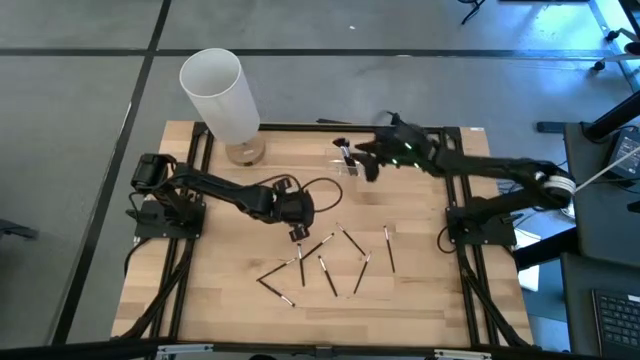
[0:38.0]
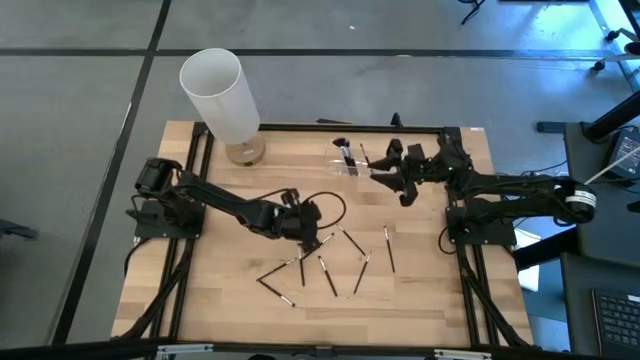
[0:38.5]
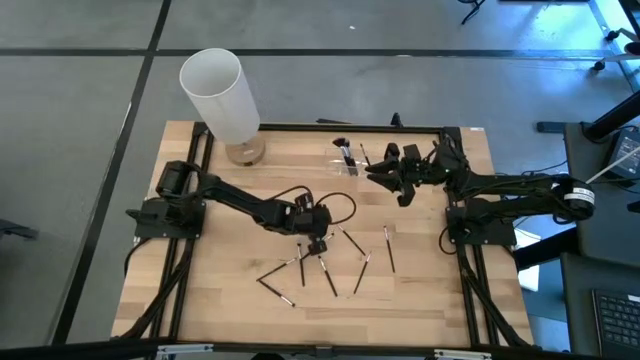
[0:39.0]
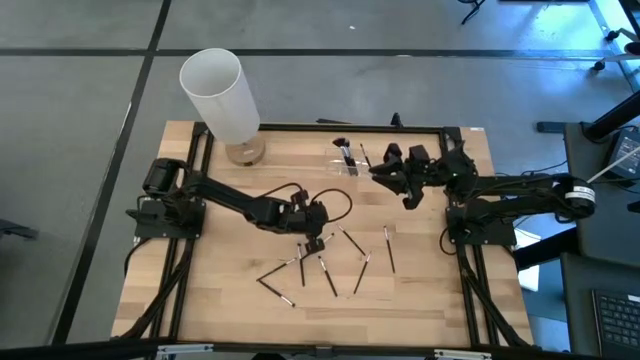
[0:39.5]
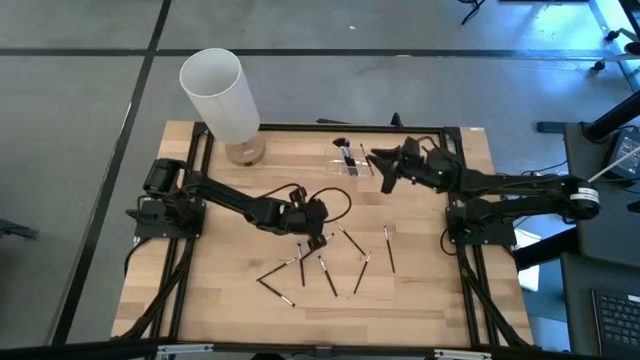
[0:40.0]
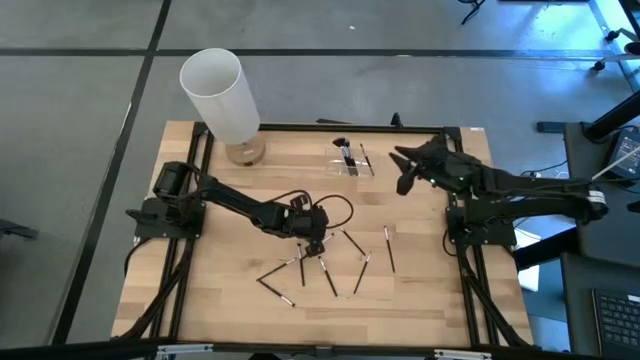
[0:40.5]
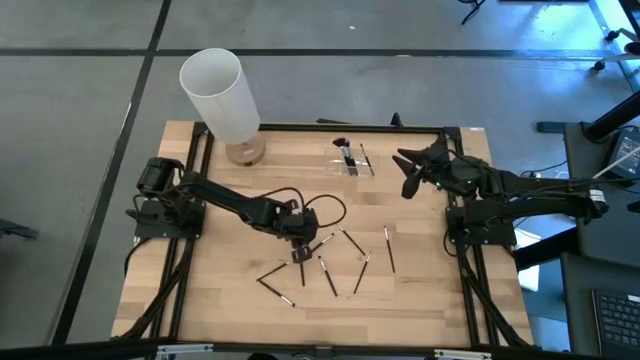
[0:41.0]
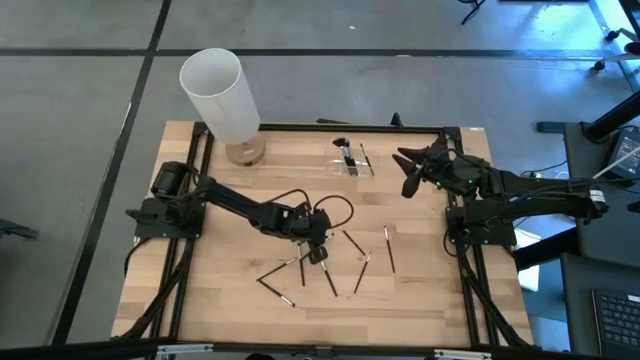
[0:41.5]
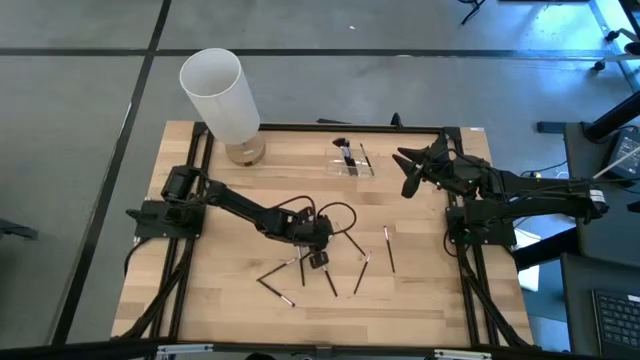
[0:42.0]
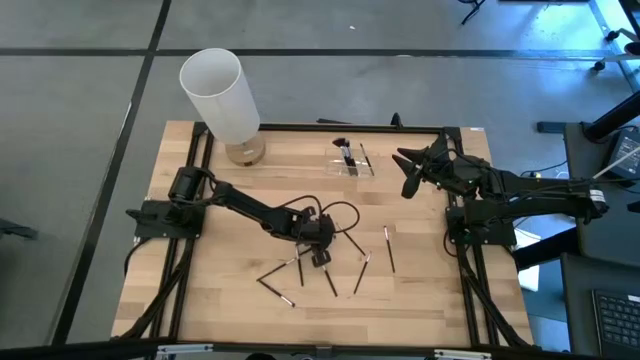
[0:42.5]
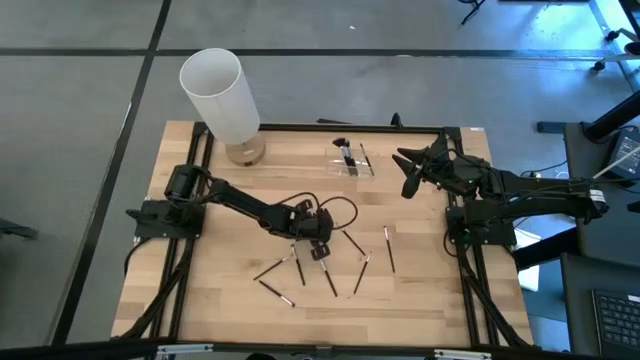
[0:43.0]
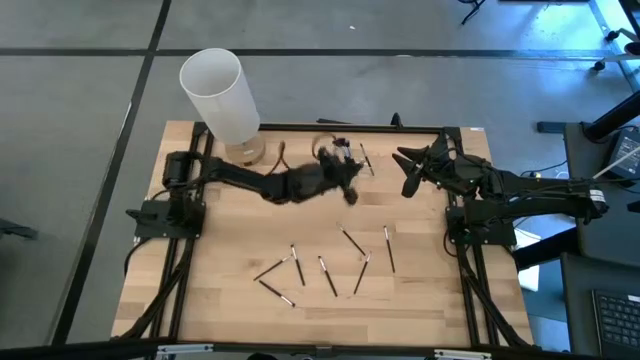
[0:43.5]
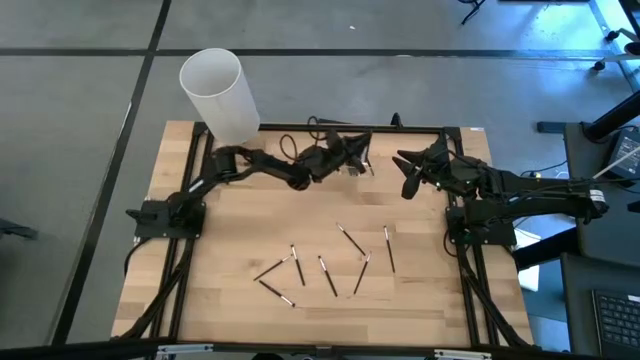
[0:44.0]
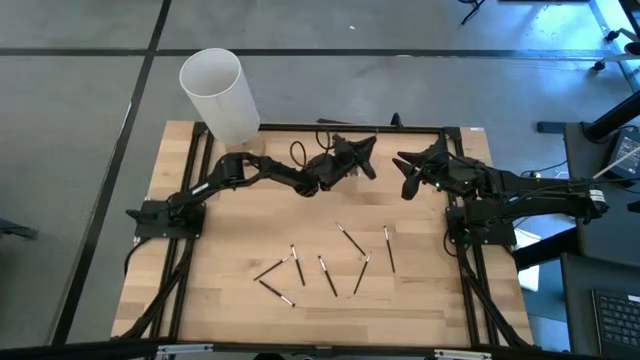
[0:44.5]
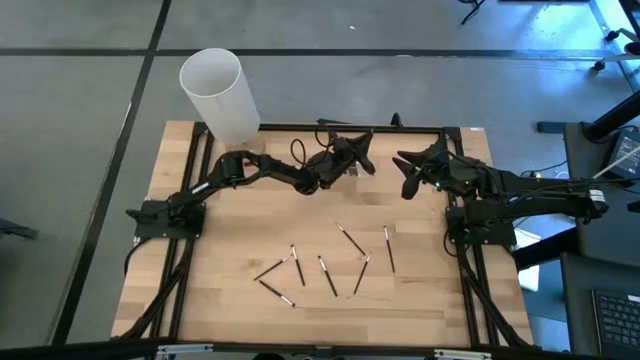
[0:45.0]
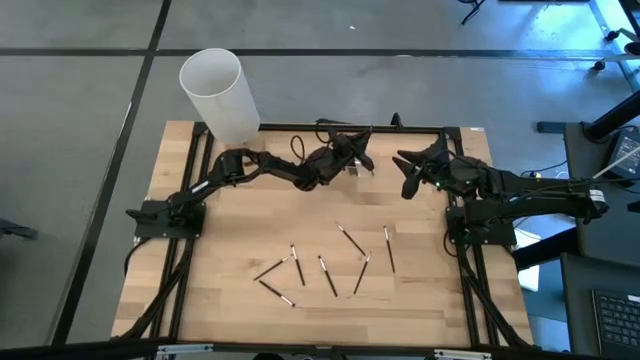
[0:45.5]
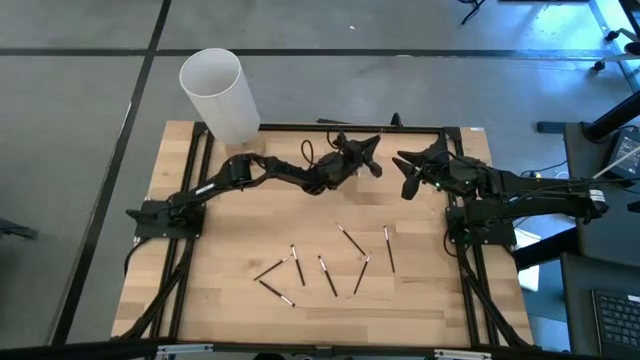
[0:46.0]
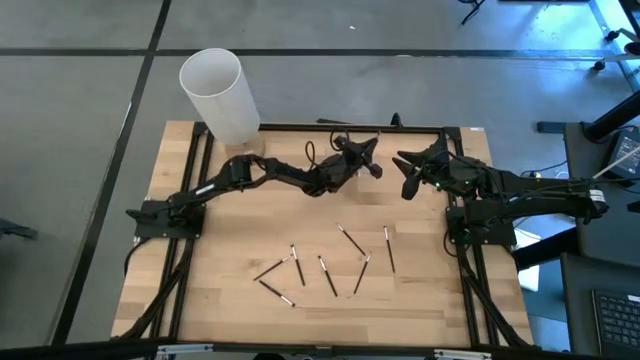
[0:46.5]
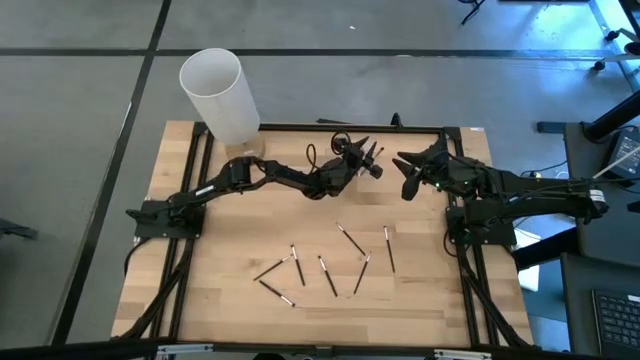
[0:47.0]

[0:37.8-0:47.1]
Task: Put items in baskets/containers
Put the black eyeshadow brush into the transparent organizer

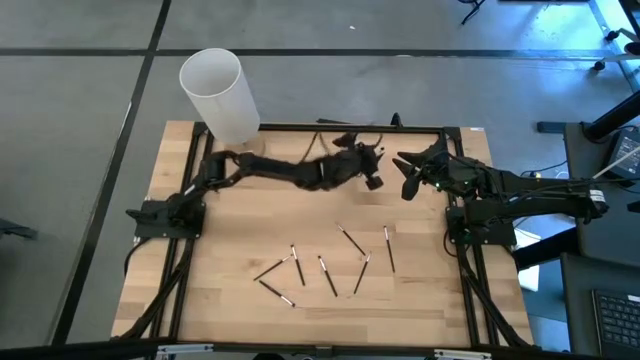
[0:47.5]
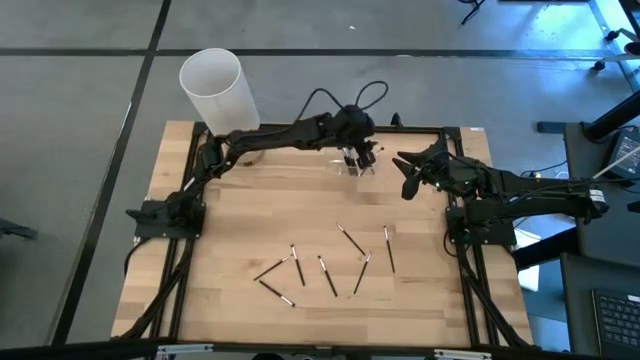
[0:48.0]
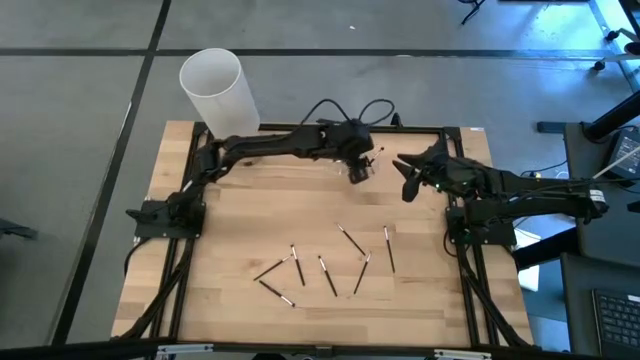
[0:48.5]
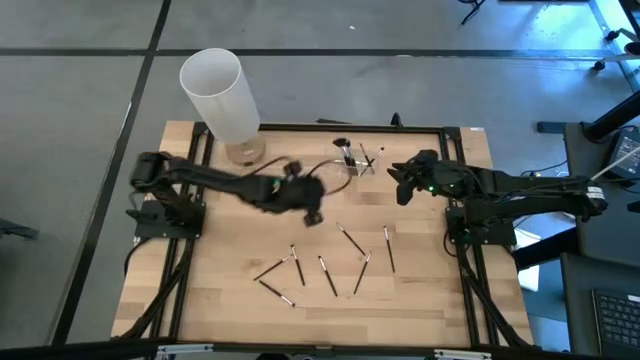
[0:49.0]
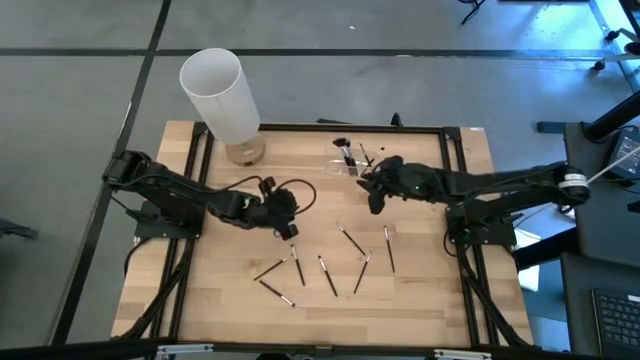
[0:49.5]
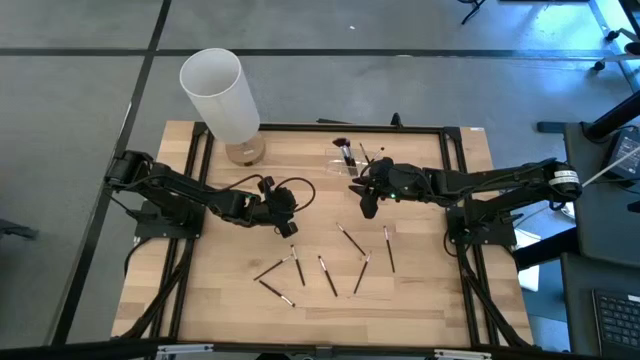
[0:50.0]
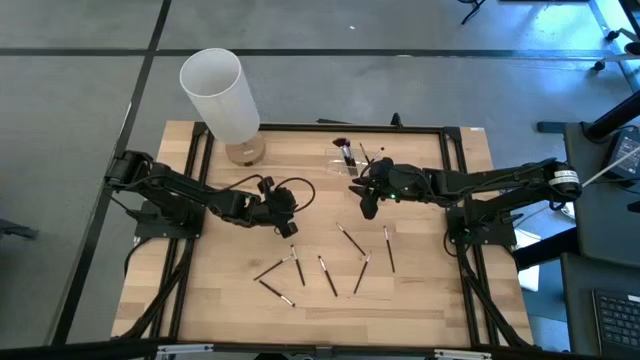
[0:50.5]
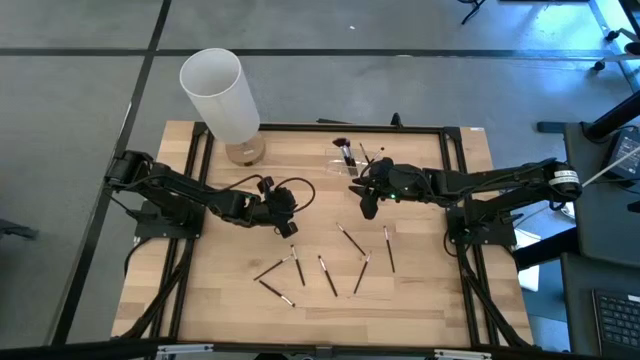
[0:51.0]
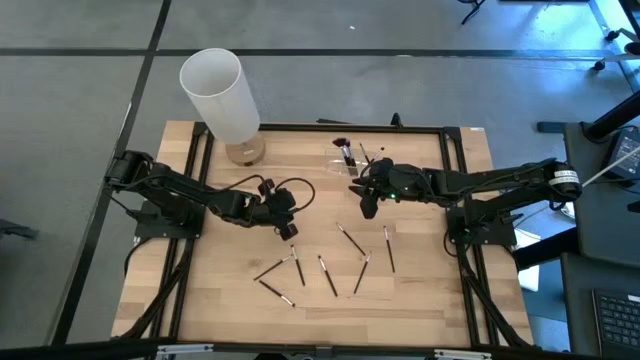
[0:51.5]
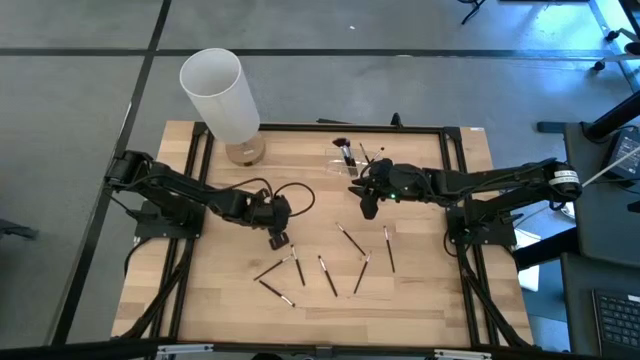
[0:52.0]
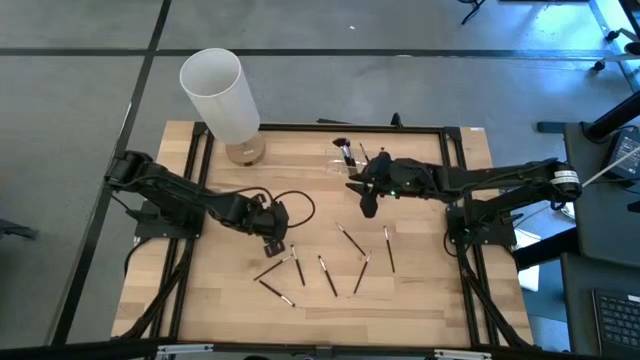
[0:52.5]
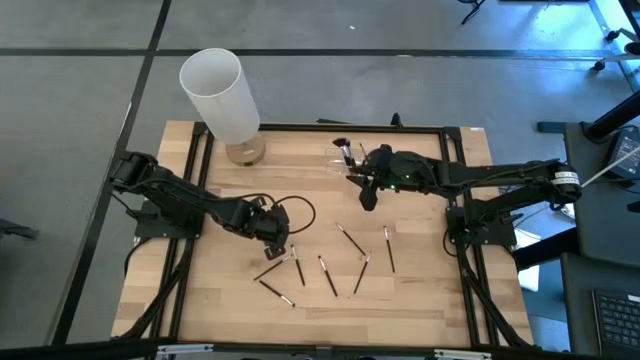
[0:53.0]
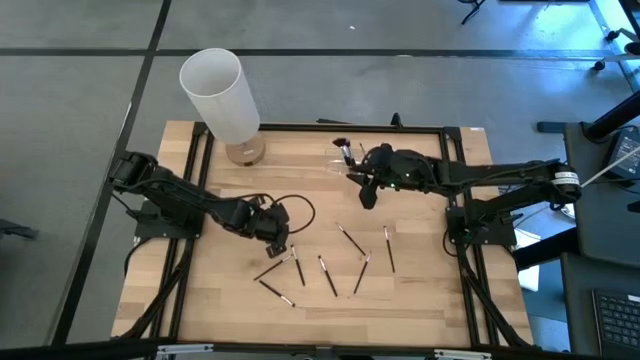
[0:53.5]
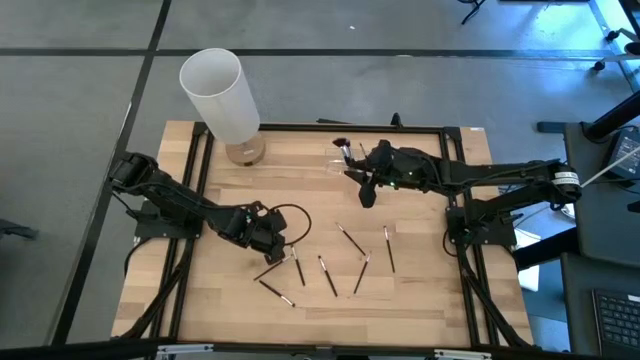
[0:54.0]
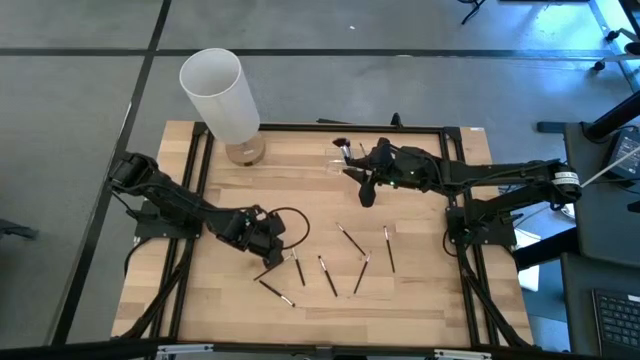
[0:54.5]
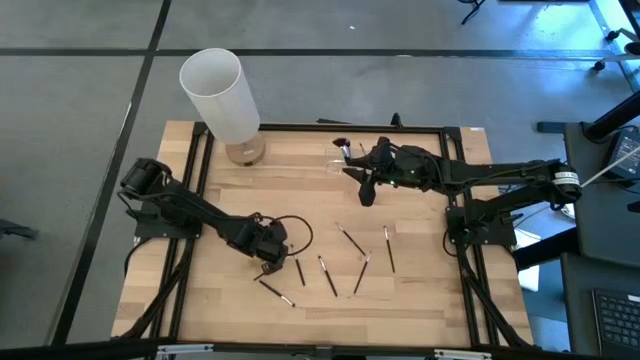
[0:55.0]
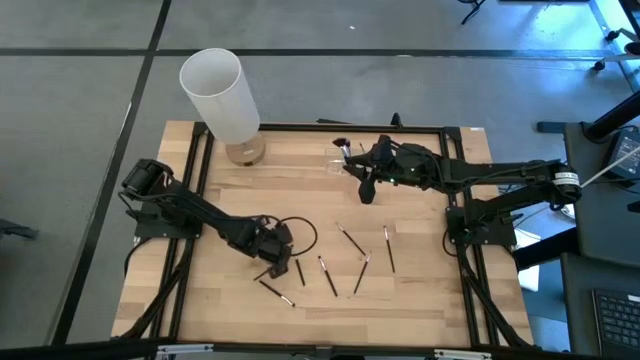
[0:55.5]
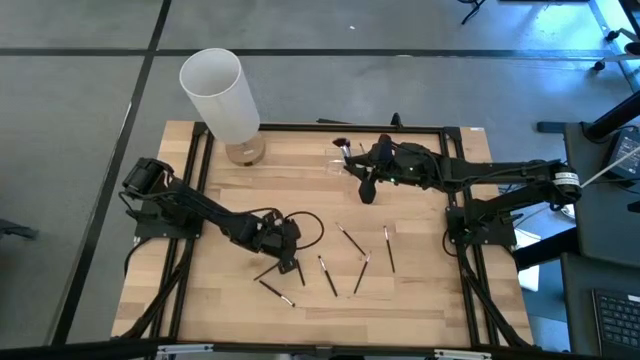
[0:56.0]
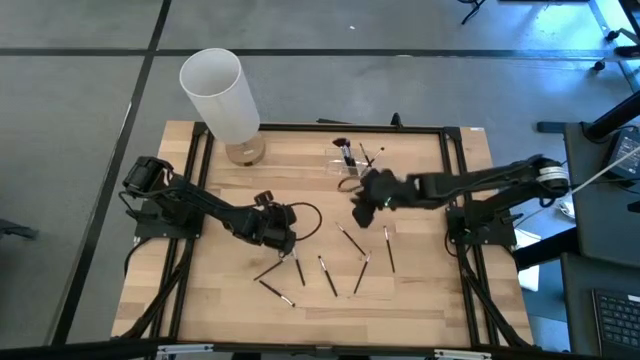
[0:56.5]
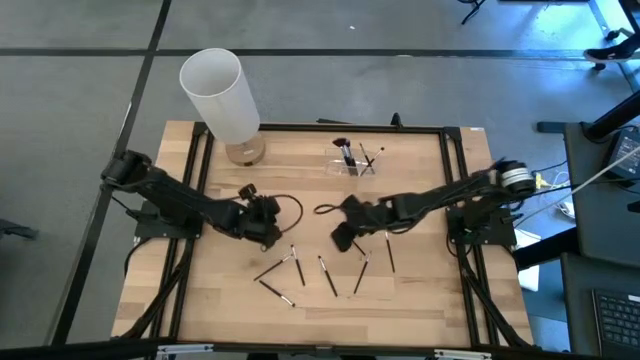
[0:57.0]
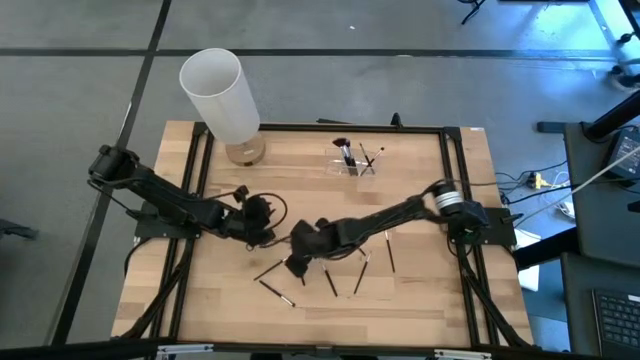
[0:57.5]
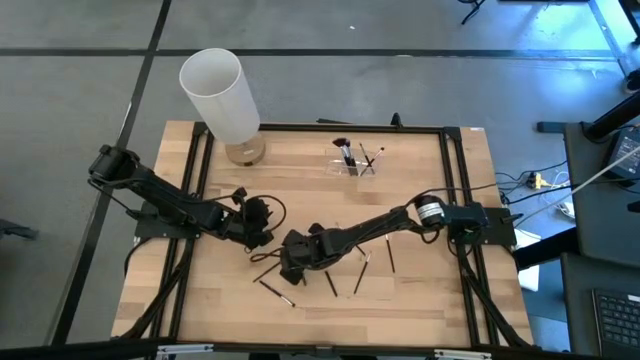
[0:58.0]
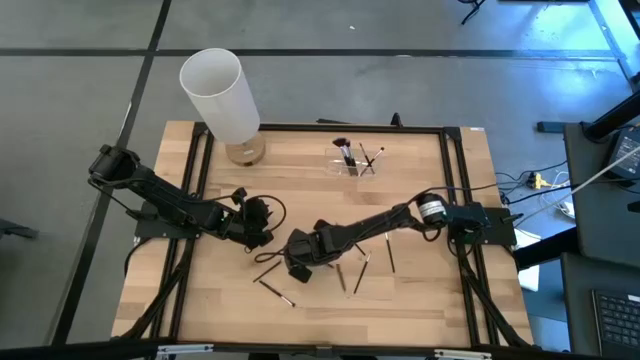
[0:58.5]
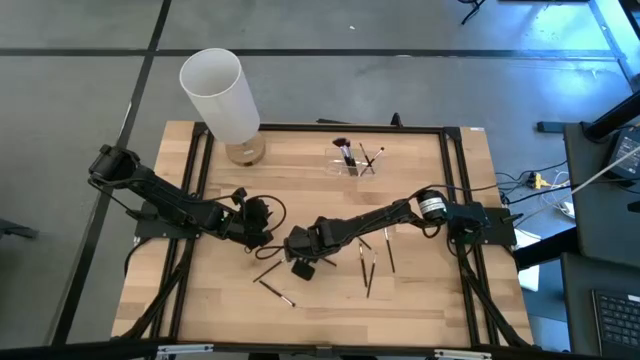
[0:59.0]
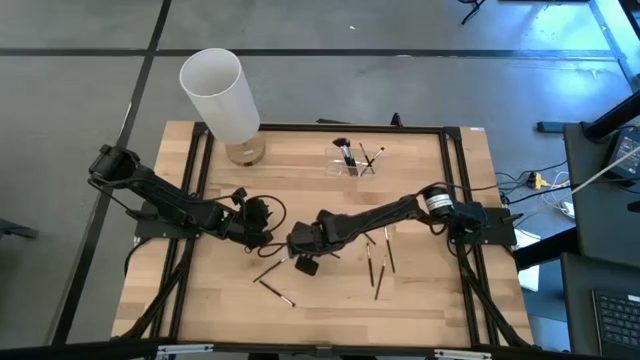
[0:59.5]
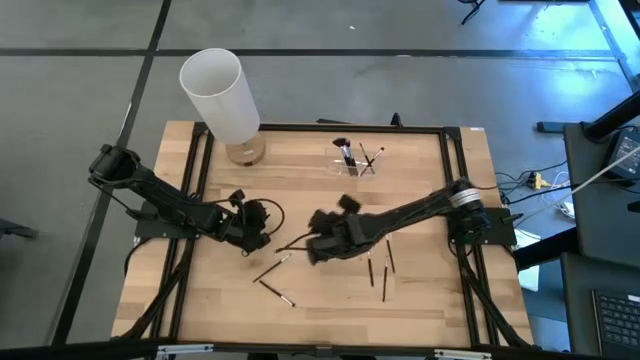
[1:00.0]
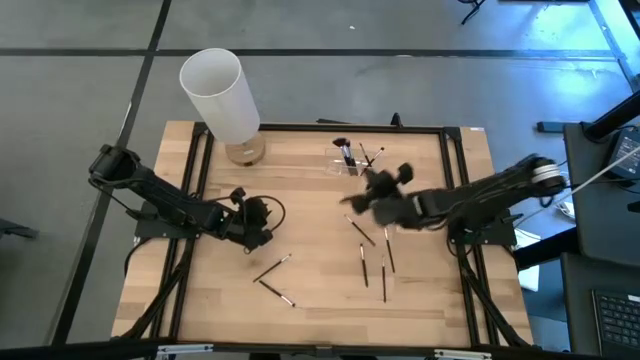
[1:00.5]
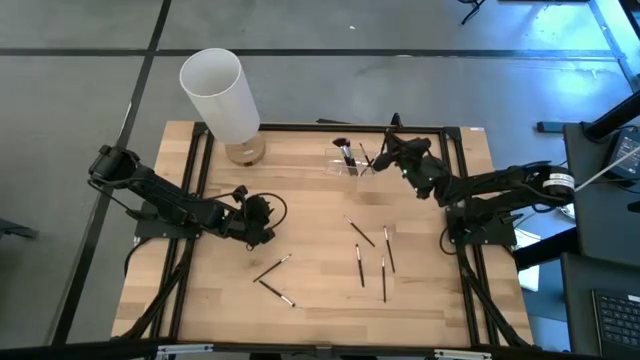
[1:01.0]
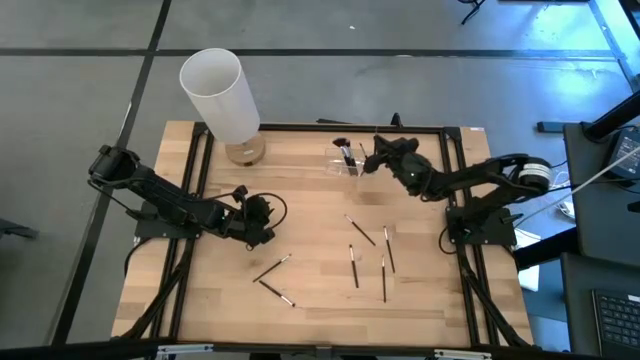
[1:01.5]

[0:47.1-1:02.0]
Put the black eyeshadow brush into the transparent organizer
